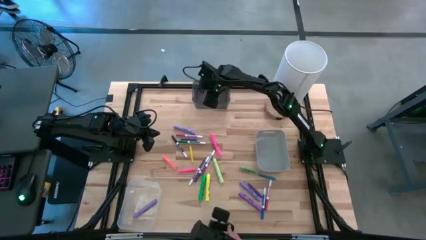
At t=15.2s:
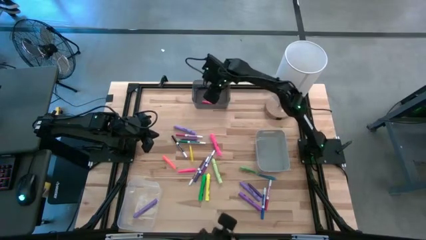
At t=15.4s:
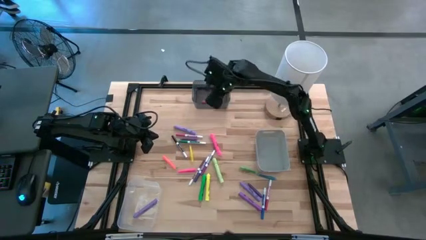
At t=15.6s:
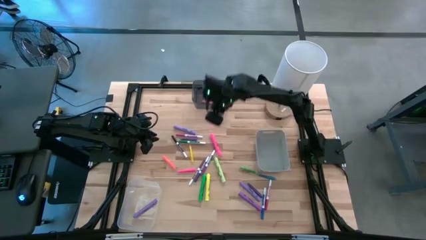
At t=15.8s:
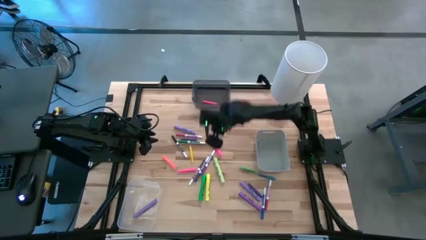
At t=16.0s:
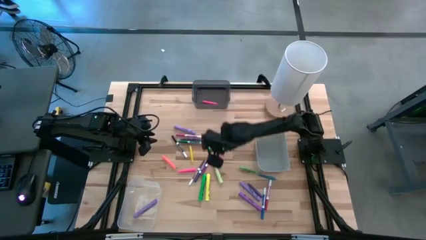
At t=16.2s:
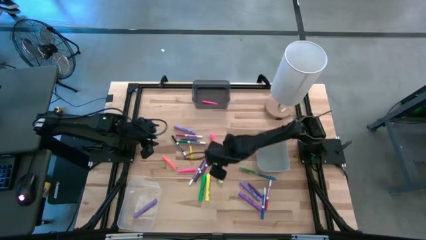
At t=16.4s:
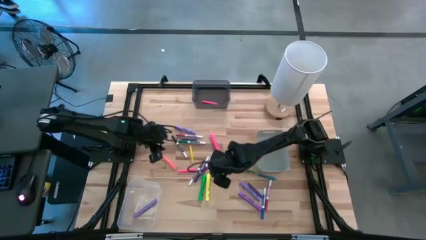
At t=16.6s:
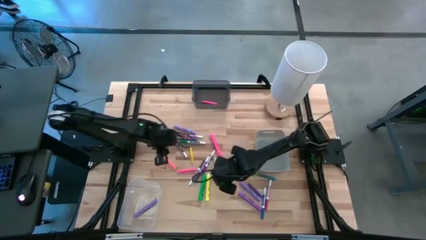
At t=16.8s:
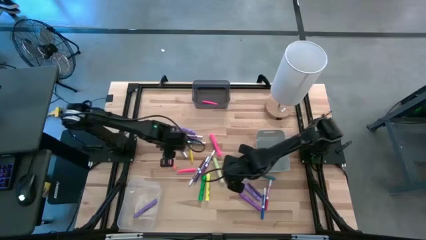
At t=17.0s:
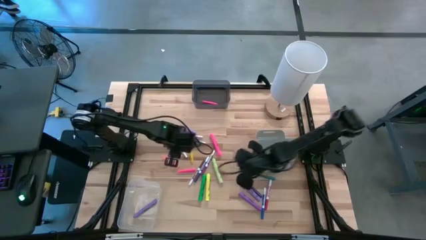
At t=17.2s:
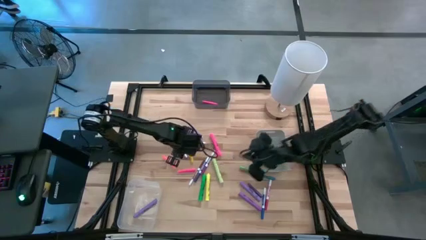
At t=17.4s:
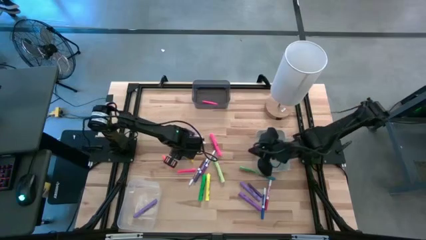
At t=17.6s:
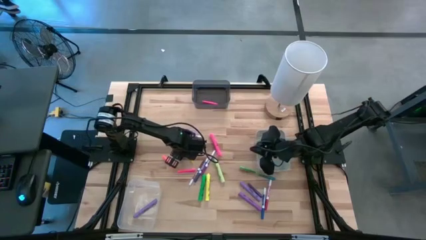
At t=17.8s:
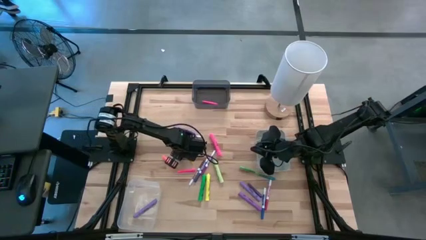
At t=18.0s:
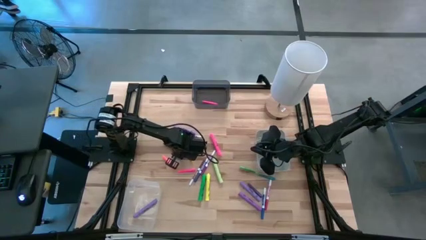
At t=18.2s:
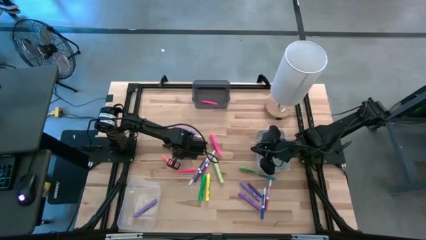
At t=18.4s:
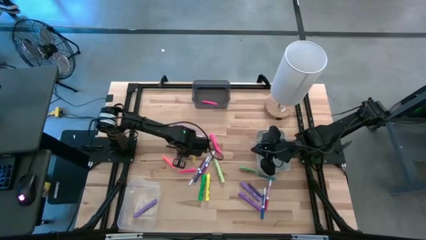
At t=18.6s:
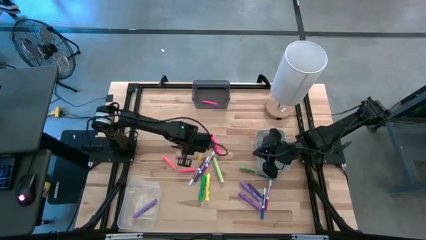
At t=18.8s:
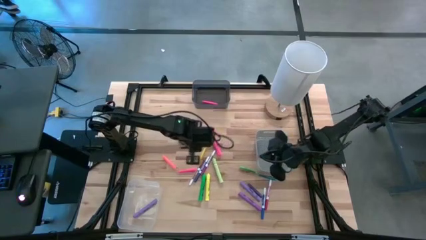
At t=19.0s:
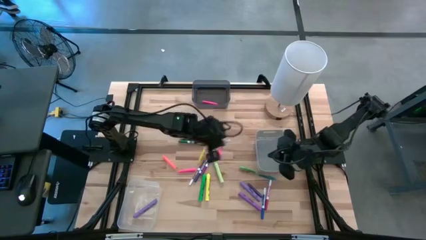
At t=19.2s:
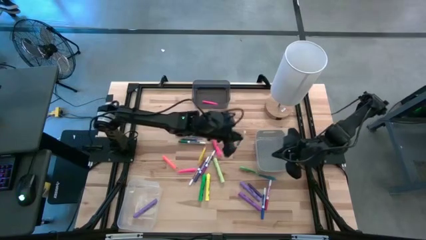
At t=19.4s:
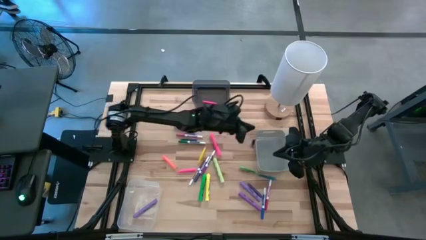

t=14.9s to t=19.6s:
Task: Pick & Place Markers
Put the black marker pen into the gray bin

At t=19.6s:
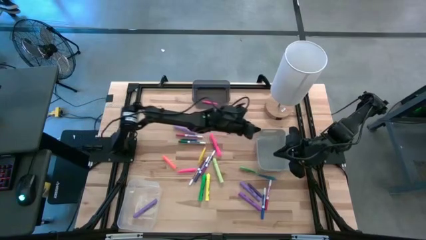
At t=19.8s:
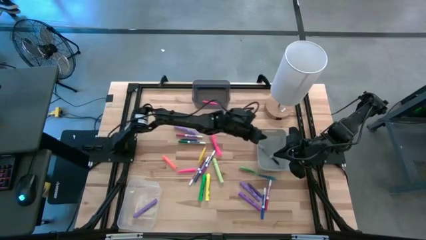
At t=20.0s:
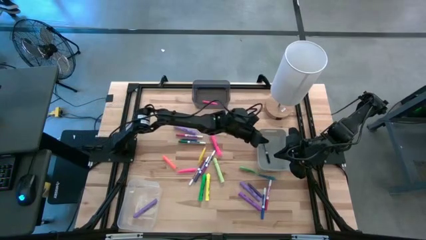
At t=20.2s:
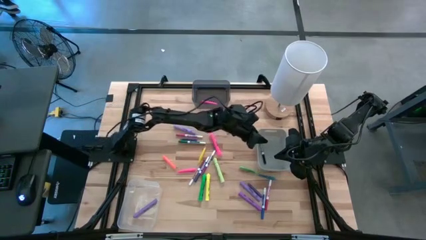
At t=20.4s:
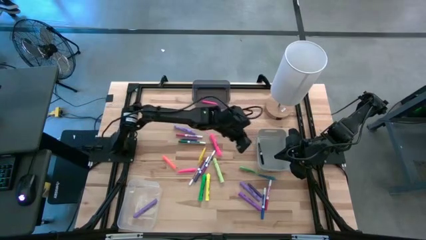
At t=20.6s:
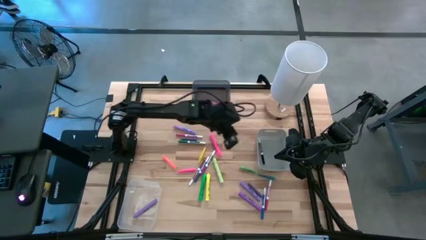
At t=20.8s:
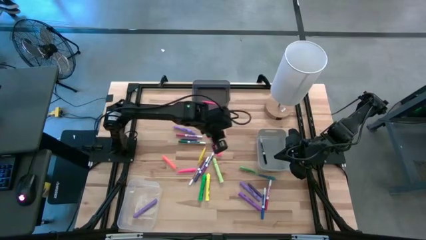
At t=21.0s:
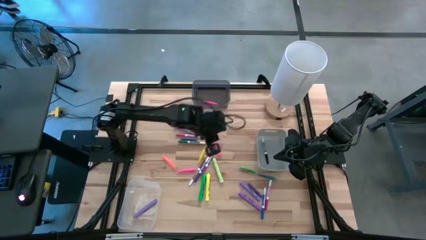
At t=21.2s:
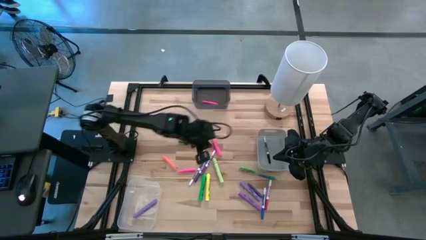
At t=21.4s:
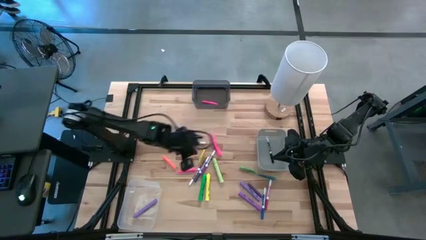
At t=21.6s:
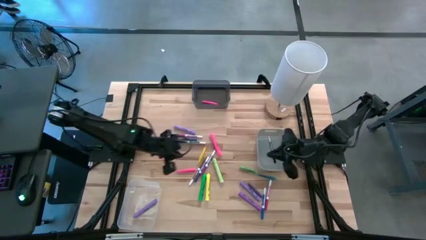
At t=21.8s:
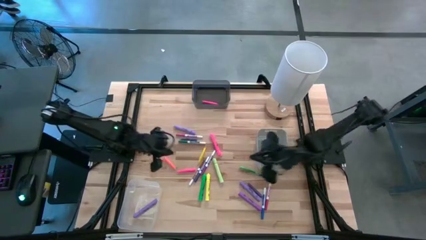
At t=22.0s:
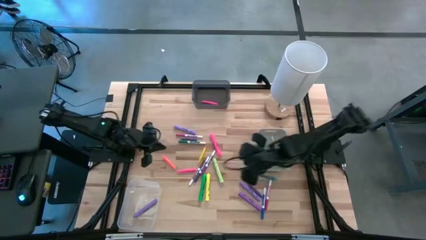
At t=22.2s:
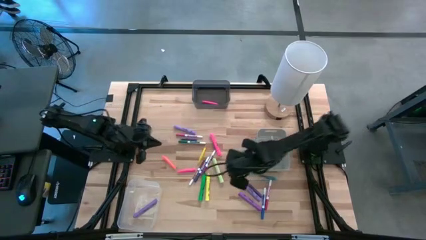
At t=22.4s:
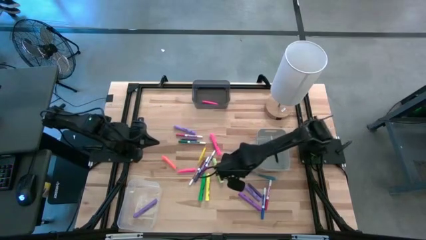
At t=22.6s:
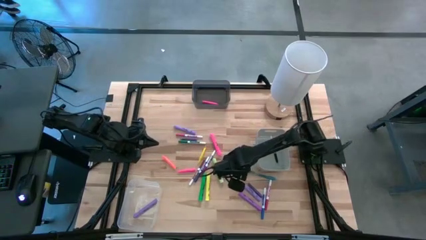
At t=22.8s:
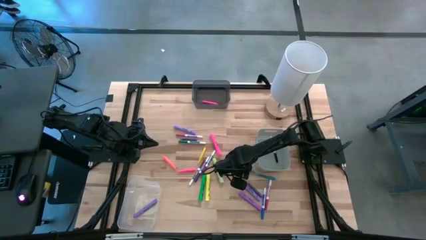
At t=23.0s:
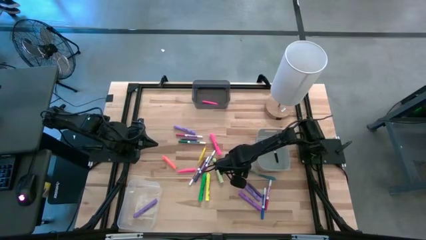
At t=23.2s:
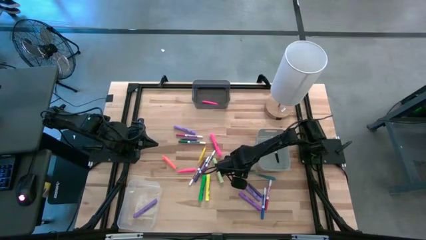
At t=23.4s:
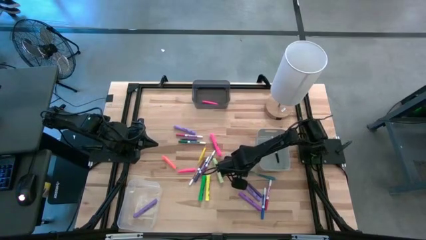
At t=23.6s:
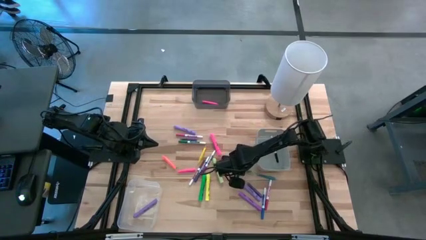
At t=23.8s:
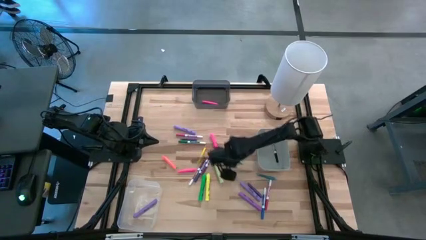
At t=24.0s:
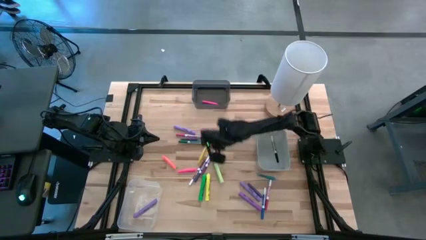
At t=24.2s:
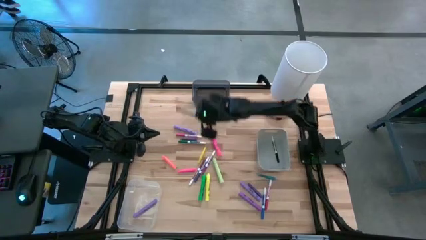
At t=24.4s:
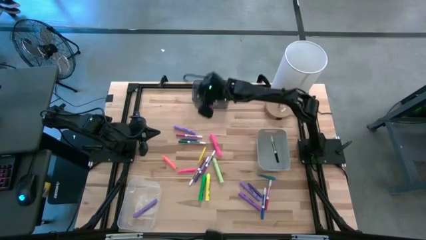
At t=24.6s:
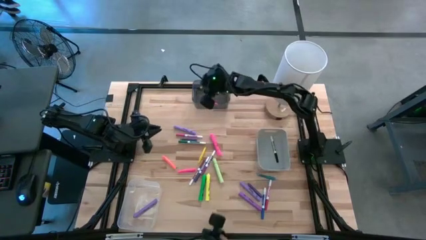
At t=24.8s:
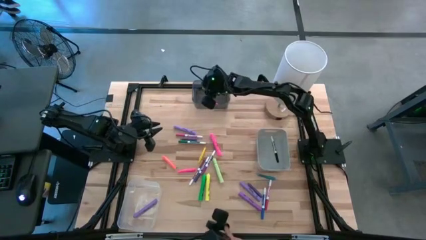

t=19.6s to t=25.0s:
Put the green pen into the black bin

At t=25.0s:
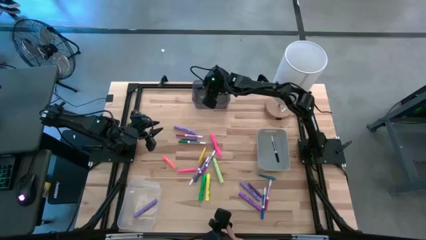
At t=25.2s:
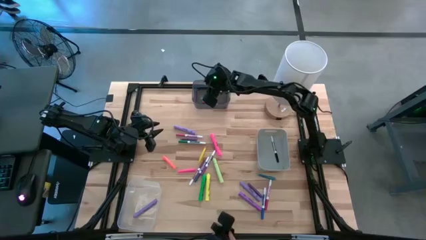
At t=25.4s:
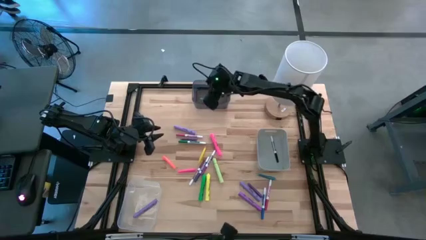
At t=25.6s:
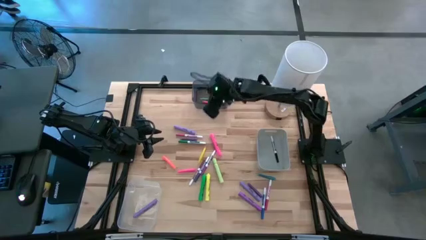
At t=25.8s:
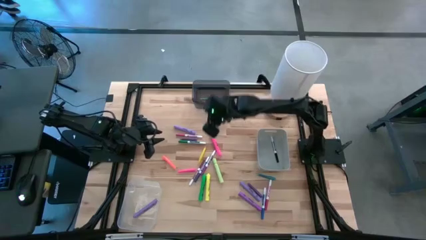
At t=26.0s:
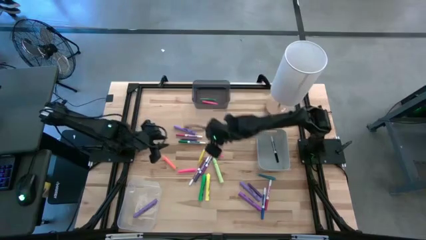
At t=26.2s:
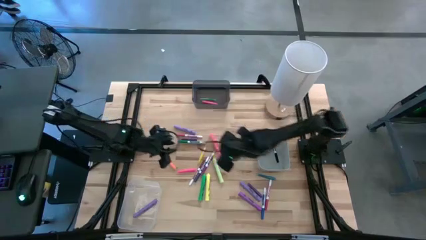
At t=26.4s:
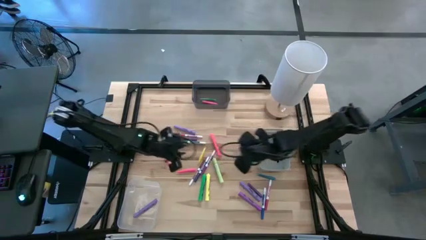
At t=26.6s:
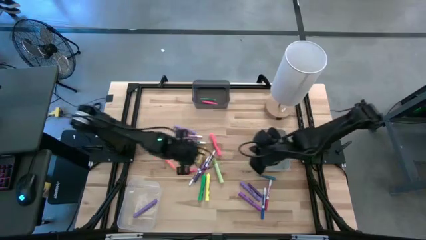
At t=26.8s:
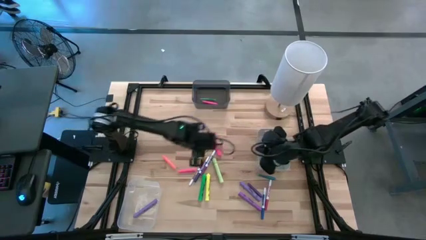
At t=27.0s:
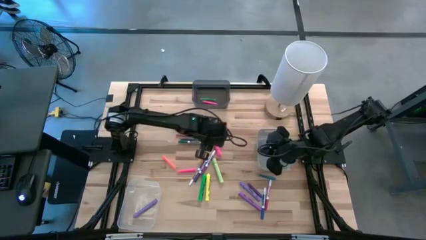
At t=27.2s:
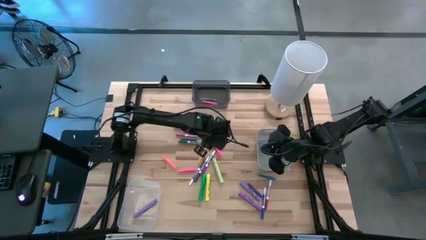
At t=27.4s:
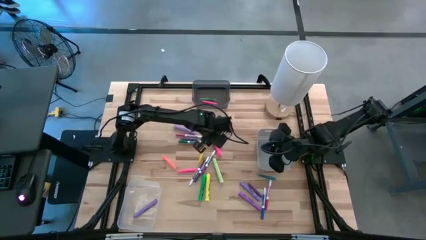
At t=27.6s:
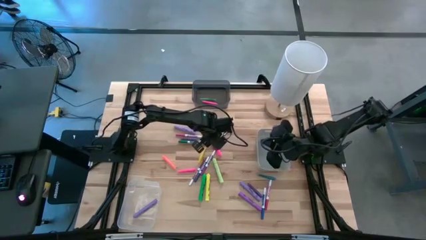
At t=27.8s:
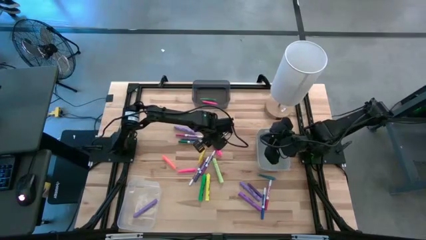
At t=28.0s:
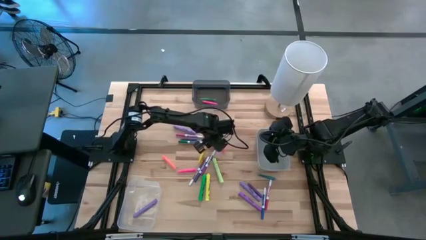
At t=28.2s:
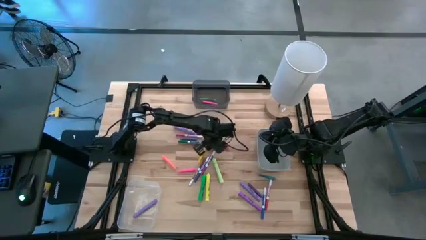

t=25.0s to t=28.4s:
Put the pink highlighter pen into the transparent bin

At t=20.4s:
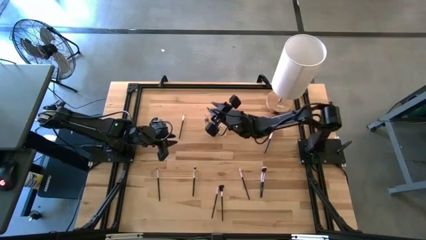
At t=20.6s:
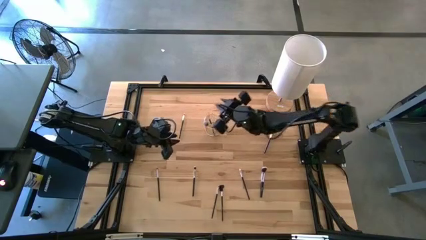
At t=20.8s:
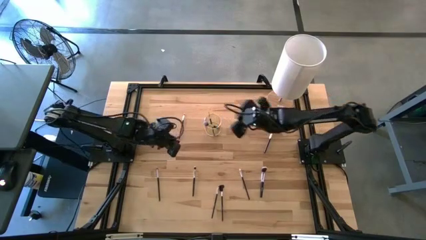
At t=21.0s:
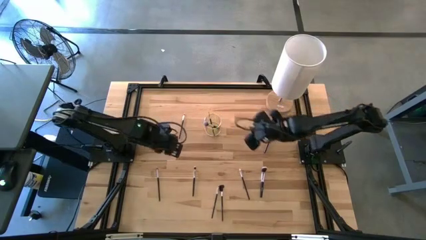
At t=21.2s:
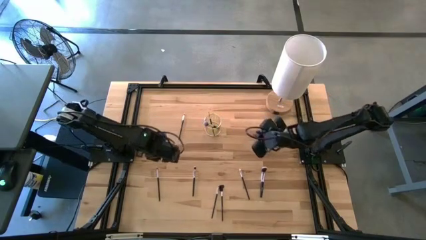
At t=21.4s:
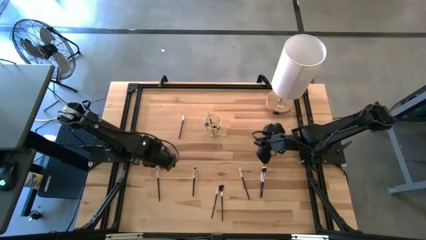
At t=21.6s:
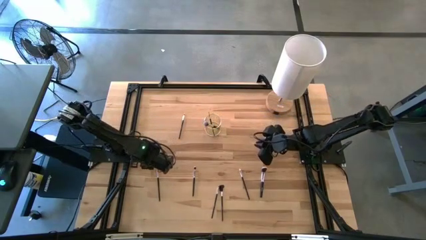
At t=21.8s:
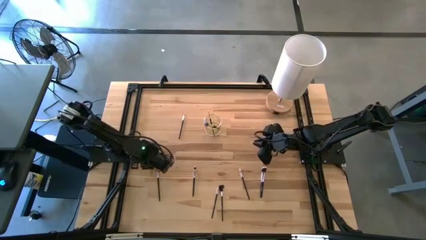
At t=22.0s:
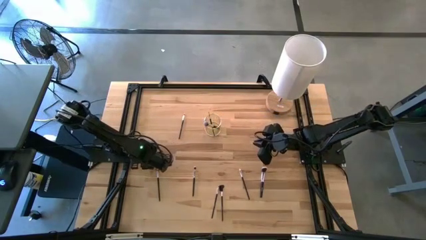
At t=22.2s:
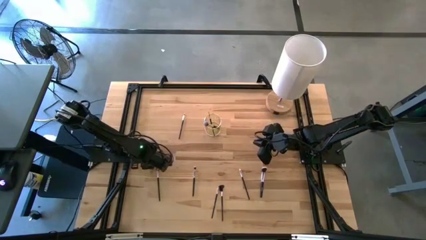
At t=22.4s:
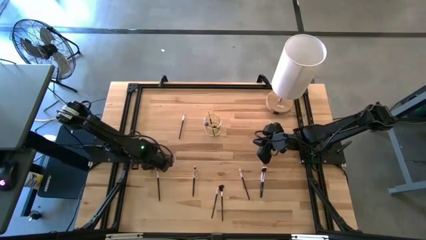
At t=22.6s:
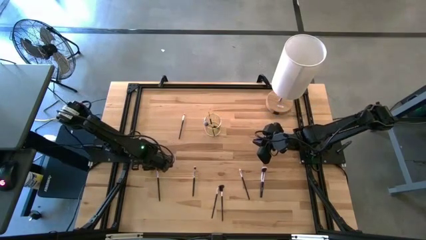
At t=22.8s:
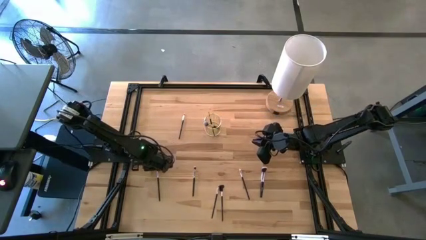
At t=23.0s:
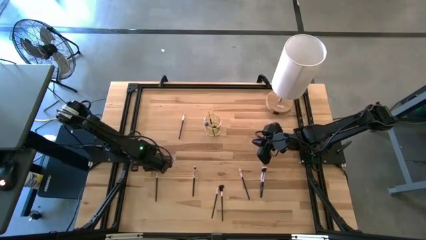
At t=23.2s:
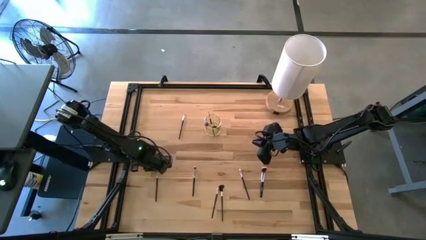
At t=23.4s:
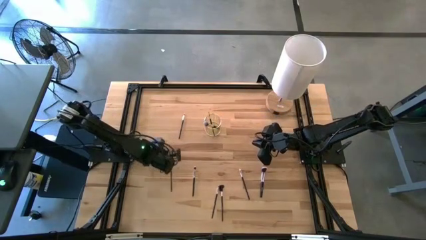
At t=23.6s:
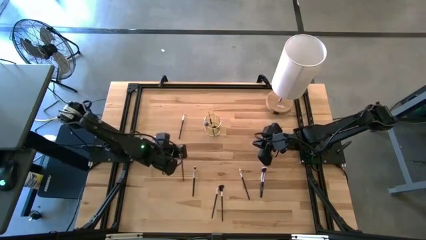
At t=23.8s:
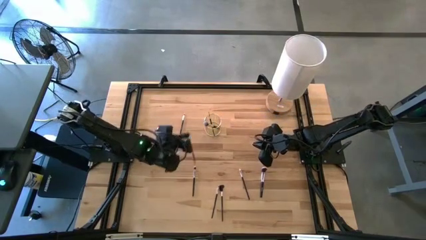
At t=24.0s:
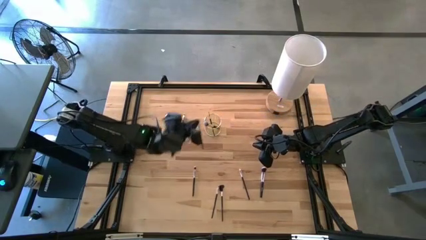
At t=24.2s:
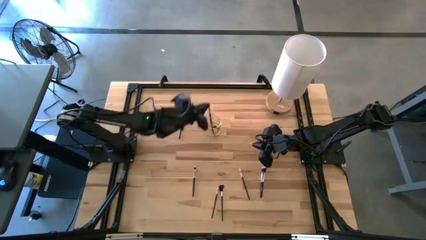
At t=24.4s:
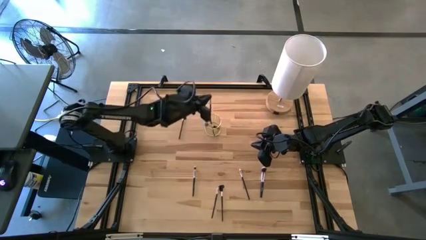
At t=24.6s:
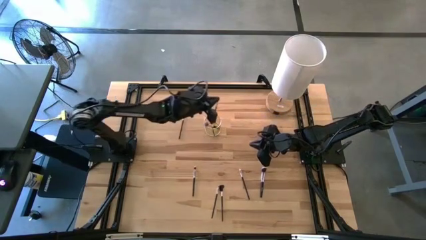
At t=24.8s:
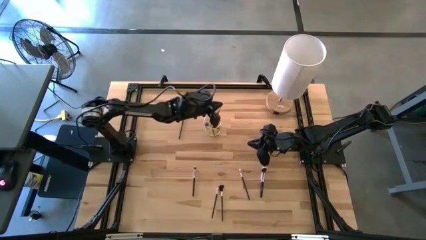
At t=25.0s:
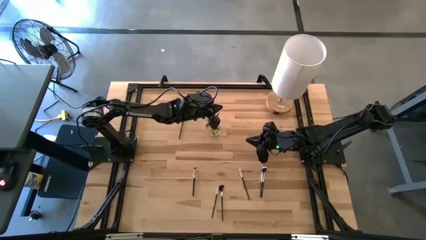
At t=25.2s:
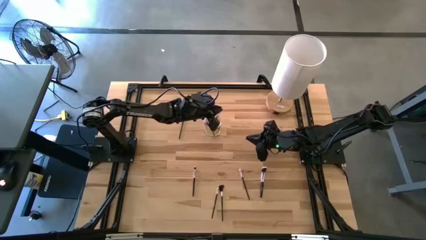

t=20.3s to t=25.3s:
Task: Put items in baskets/containers
Put the black eyeshadow brush into the gold container
